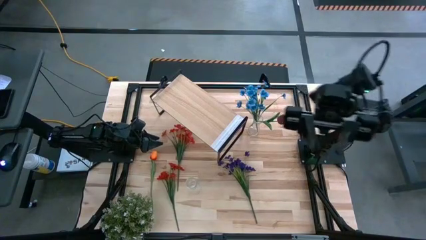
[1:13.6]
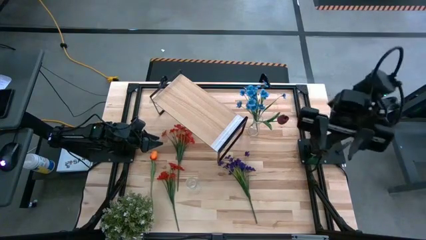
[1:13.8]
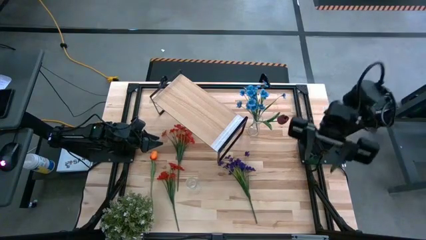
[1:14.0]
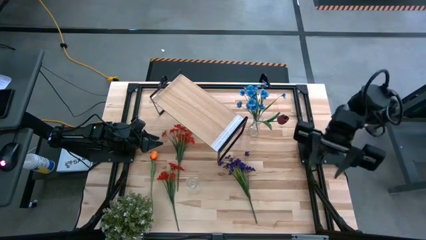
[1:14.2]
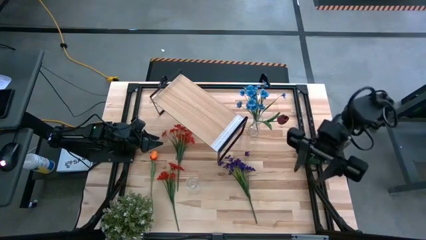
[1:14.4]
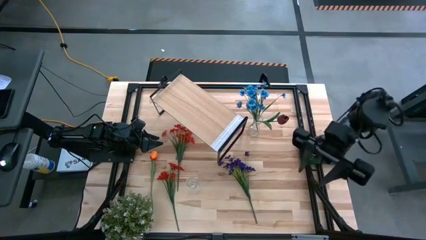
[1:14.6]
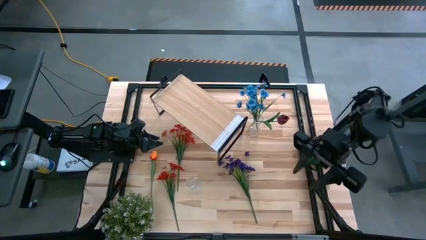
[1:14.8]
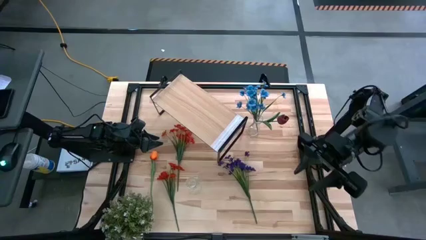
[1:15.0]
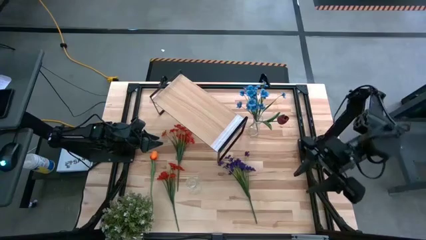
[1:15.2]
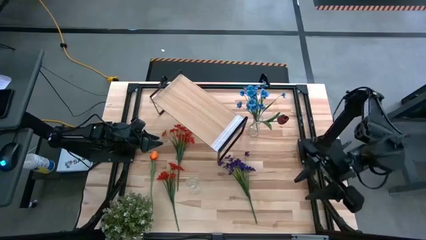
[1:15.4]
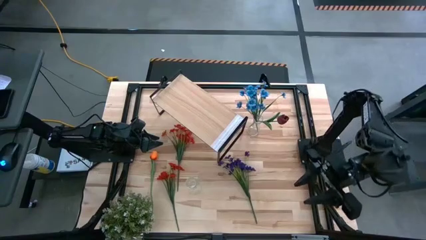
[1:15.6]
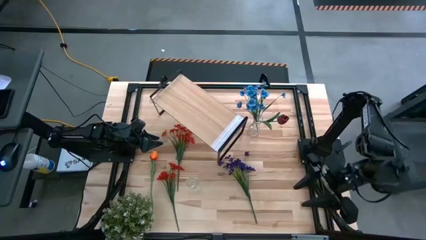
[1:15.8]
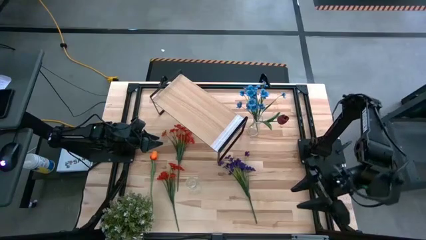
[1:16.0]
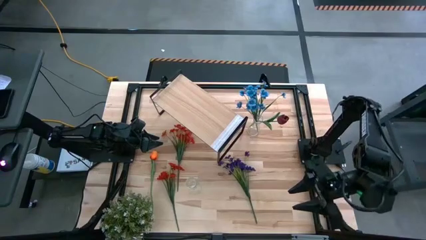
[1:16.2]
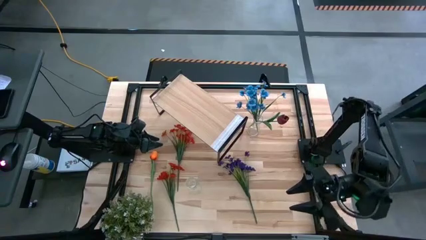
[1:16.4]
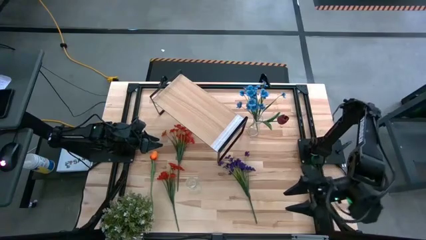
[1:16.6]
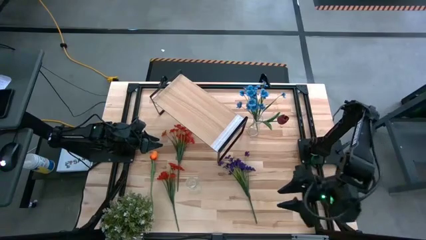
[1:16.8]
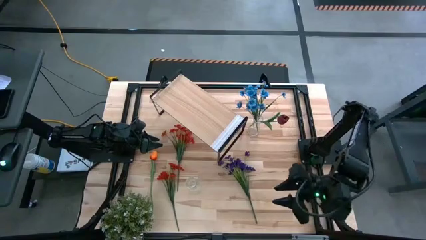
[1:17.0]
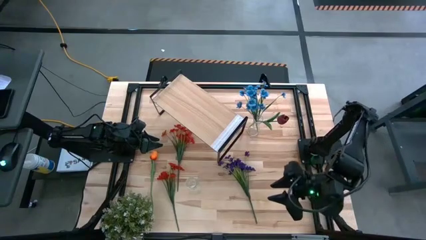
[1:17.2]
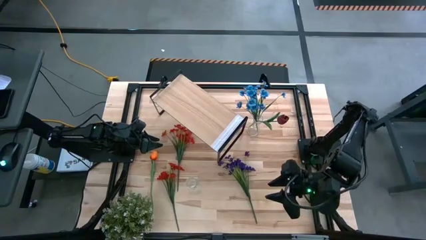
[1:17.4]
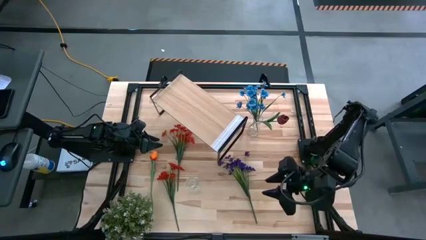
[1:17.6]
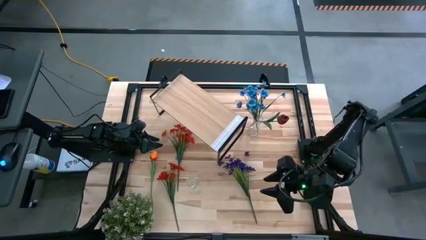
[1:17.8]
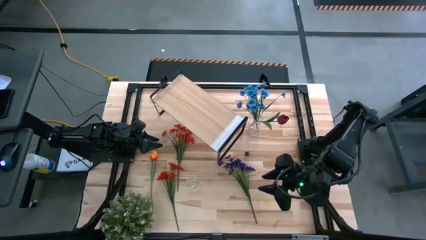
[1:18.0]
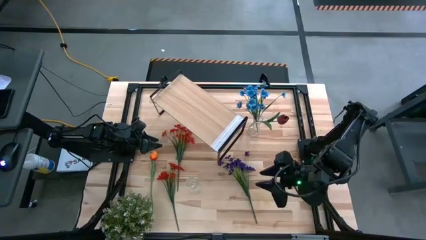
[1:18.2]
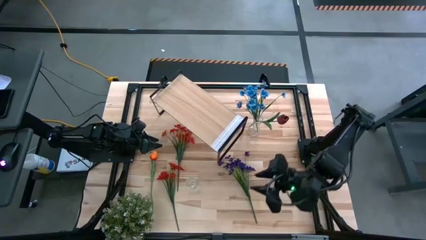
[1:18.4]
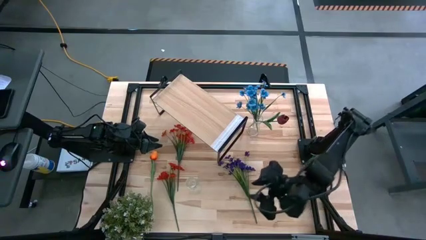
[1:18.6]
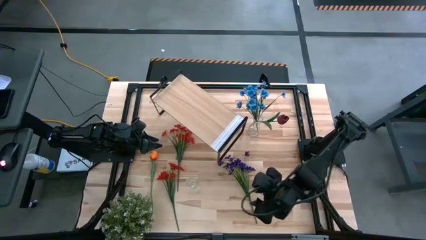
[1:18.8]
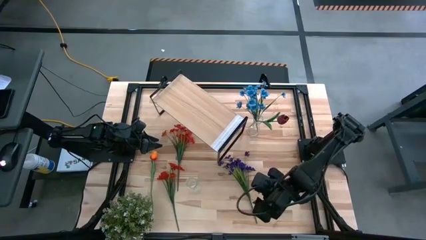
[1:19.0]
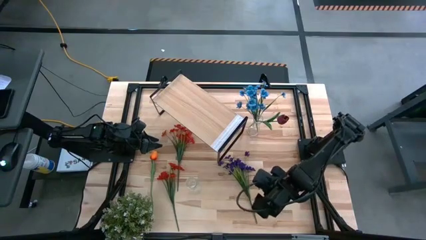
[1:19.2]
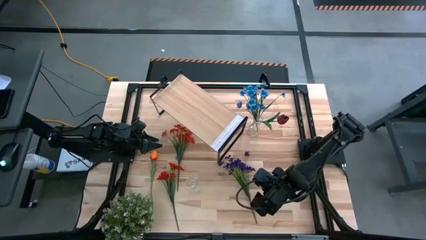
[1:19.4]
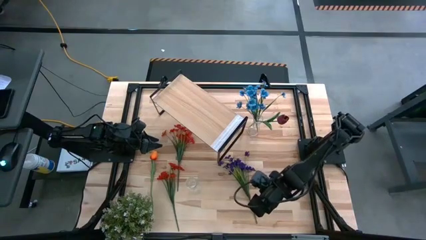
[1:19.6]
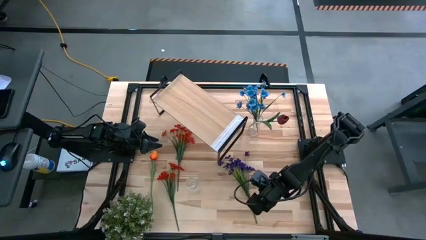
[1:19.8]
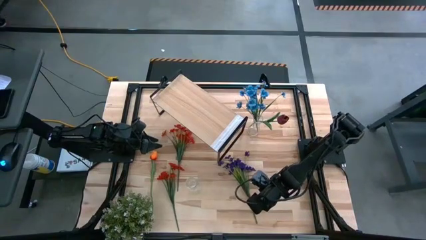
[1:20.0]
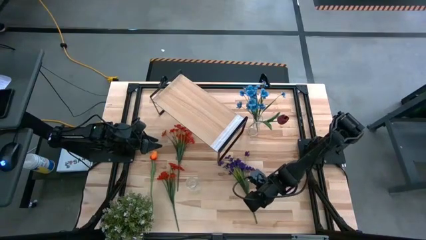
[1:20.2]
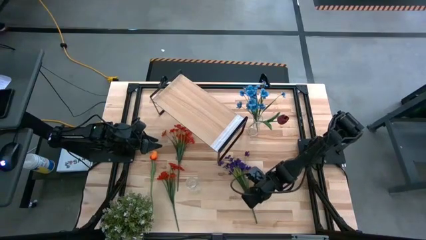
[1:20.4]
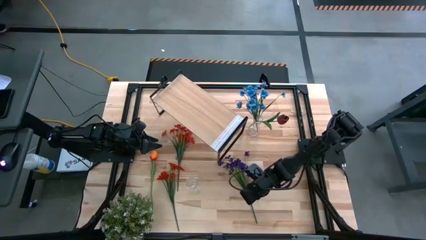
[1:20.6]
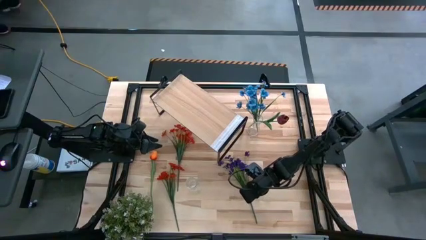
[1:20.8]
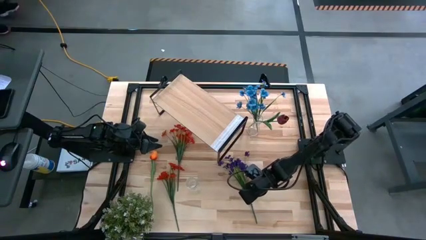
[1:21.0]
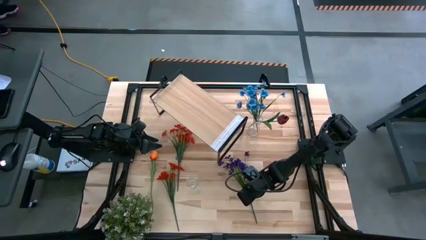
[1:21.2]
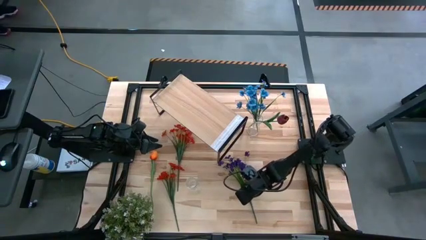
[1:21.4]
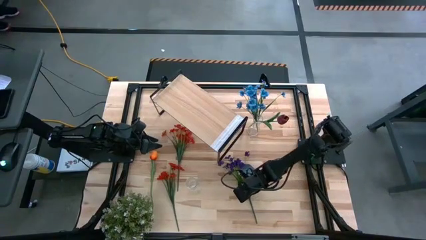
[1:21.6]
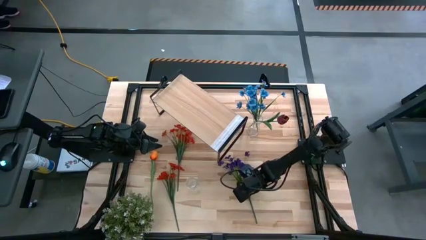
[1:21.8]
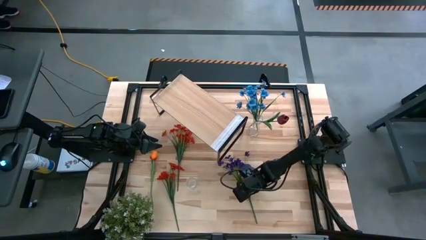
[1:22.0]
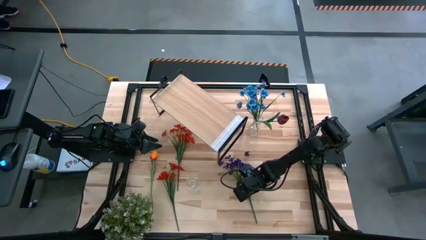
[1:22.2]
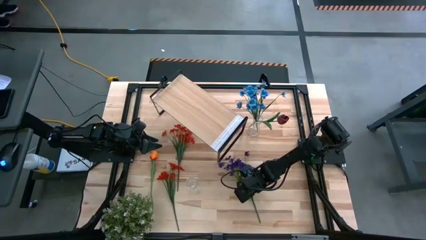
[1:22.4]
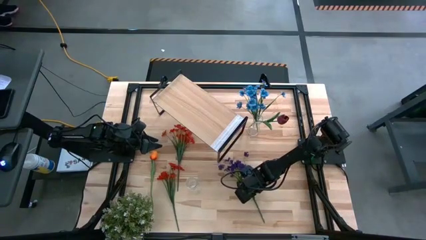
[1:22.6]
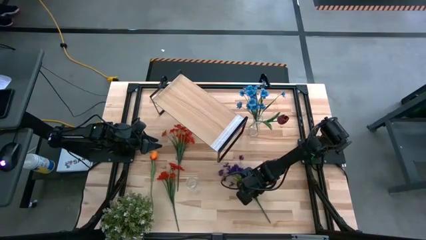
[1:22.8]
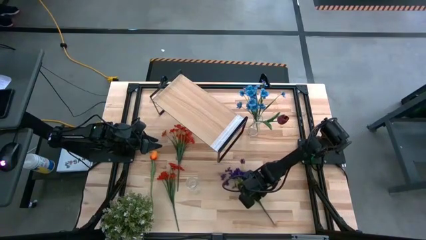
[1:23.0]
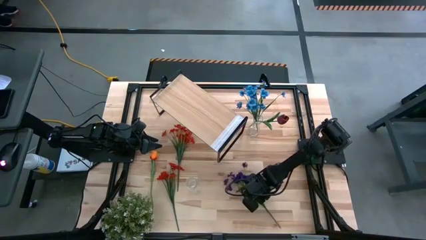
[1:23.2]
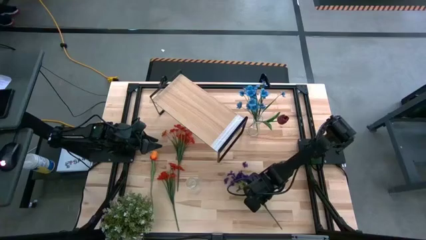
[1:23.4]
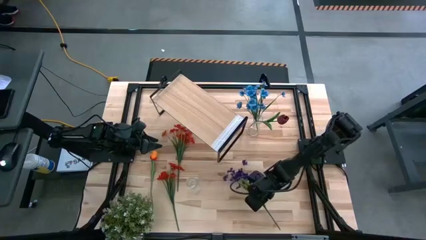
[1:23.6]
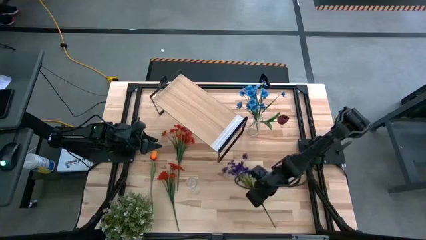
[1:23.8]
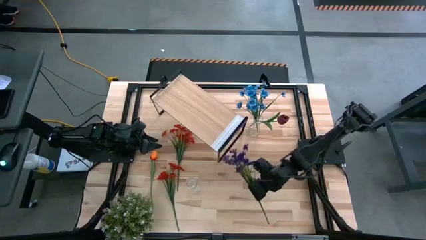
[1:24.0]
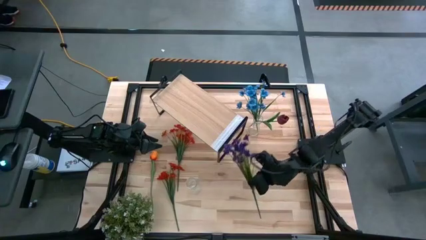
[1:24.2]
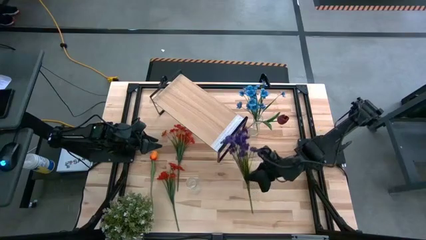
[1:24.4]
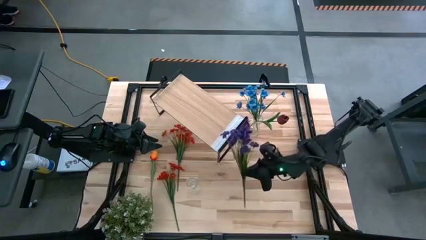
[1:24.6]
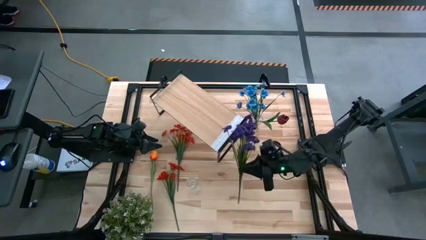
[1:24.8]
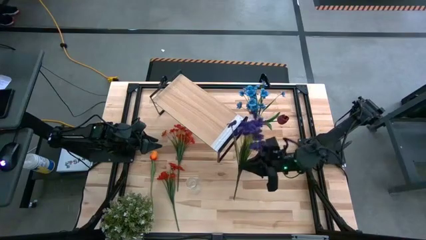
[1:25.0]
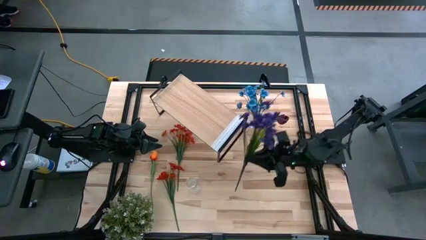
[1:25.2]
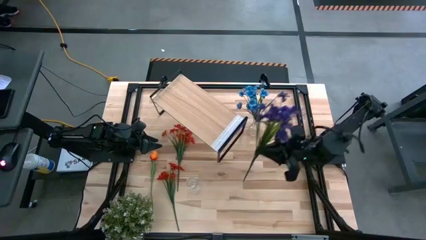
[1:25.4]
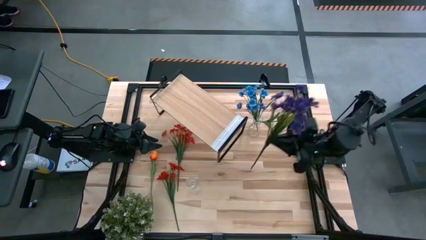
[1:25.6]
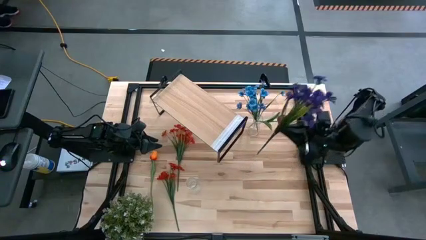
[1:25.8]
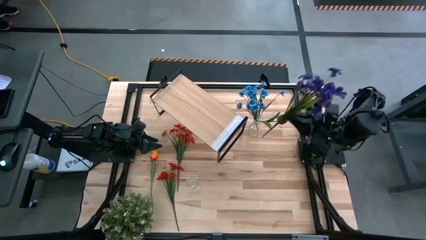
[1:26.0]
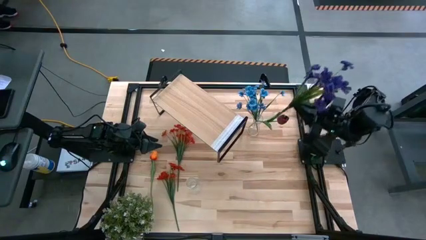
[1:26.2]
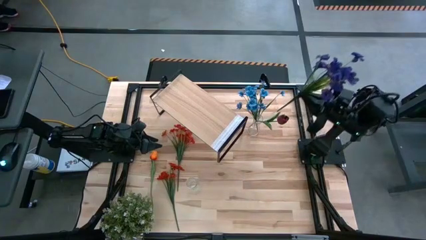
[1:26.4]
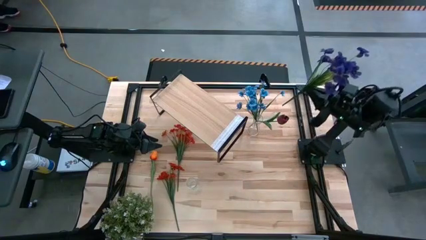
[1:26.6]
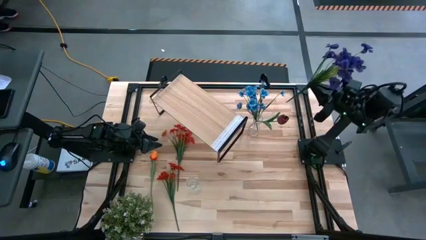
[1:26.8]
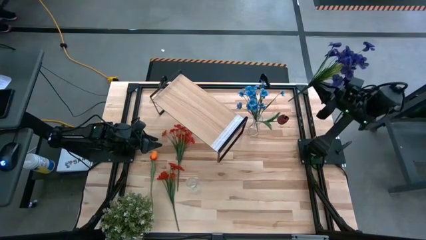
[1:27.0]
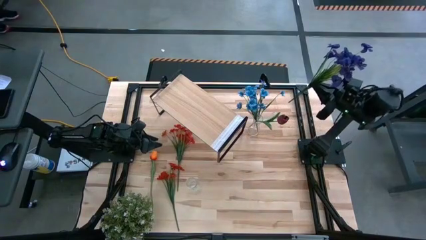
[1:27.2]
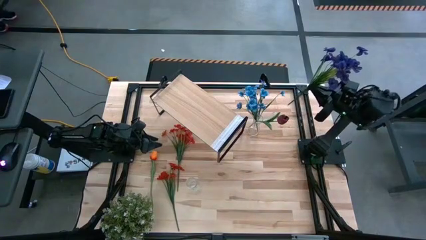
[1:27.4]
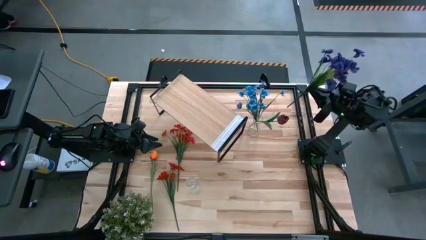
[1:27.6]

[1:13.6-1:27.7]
Task: Pick and place flowers into a vace then onto a shelf
Put the violet flowers into the top transparent vase
